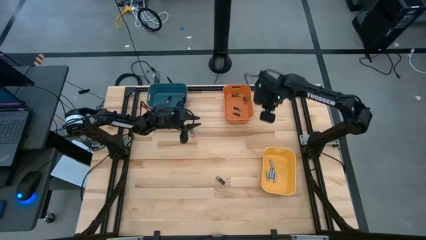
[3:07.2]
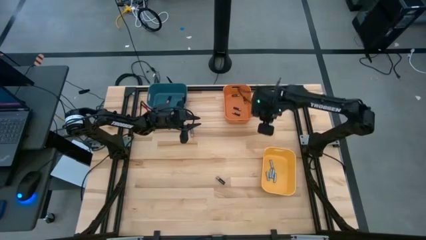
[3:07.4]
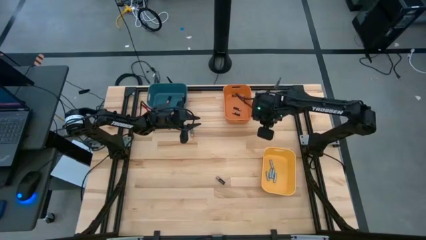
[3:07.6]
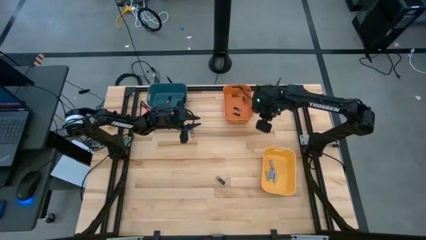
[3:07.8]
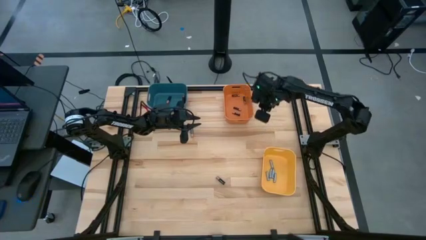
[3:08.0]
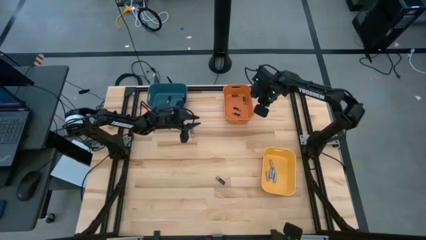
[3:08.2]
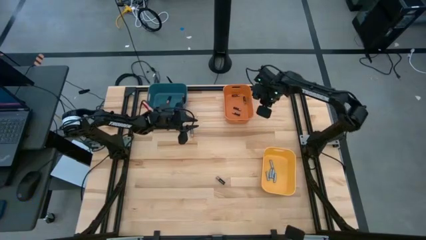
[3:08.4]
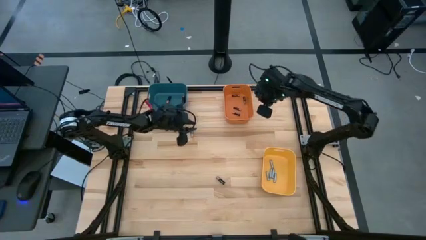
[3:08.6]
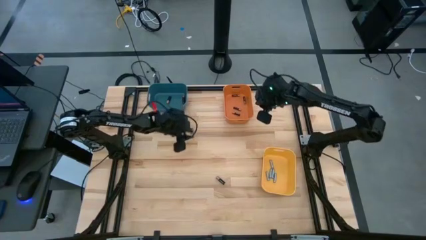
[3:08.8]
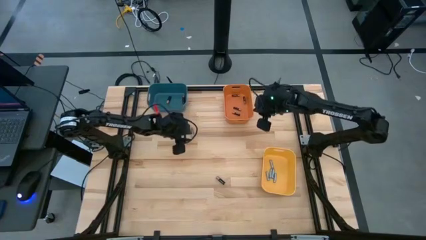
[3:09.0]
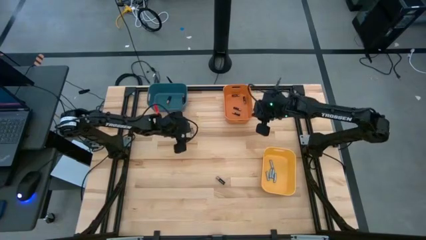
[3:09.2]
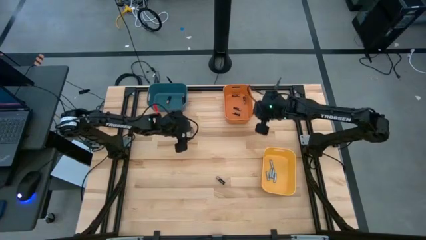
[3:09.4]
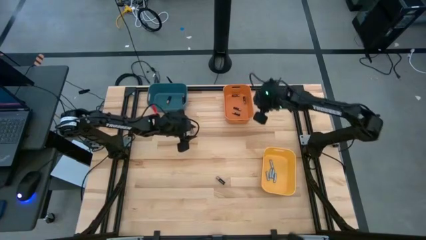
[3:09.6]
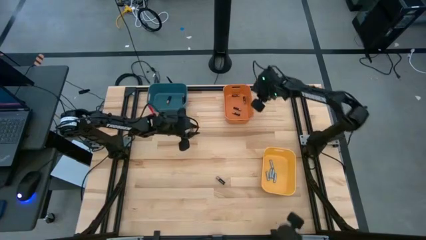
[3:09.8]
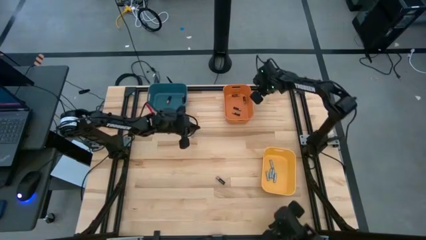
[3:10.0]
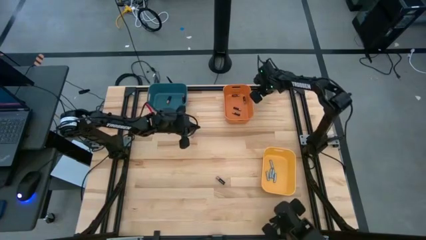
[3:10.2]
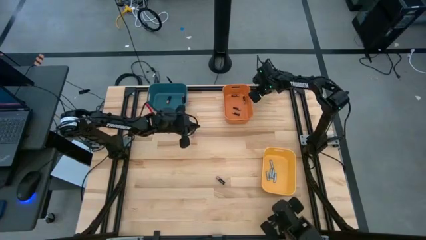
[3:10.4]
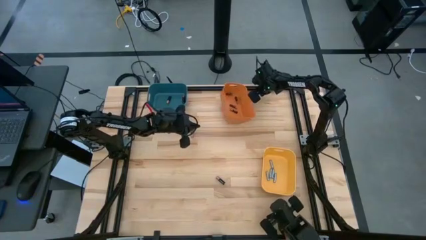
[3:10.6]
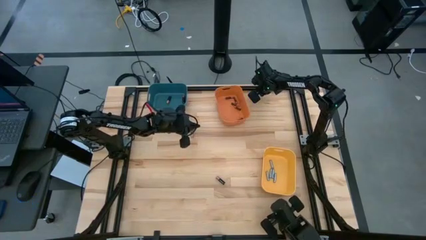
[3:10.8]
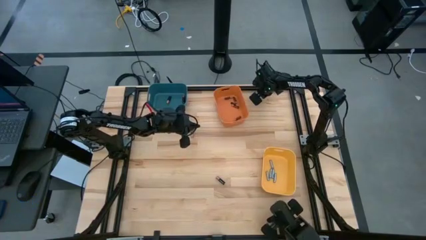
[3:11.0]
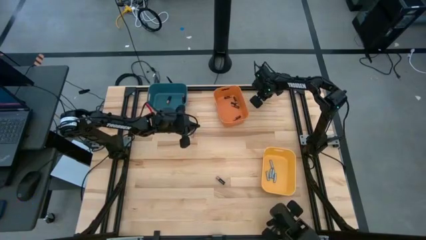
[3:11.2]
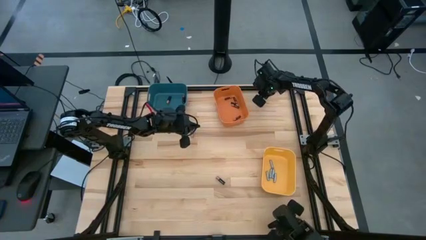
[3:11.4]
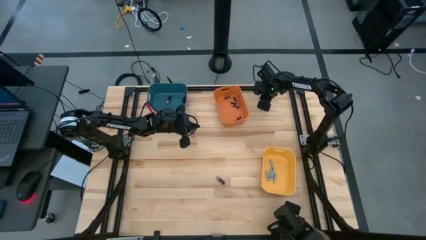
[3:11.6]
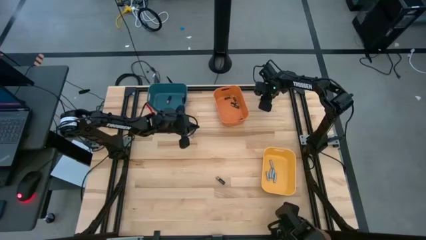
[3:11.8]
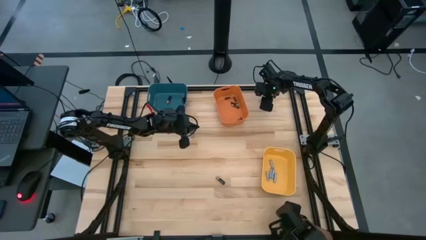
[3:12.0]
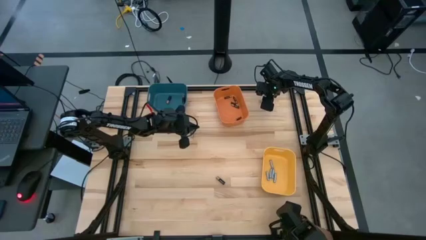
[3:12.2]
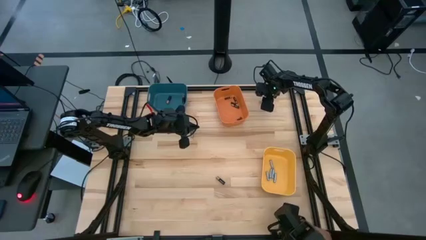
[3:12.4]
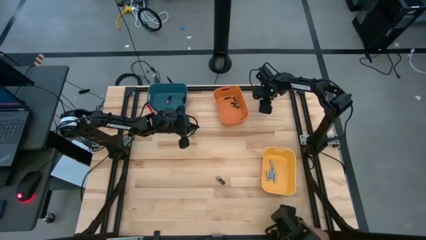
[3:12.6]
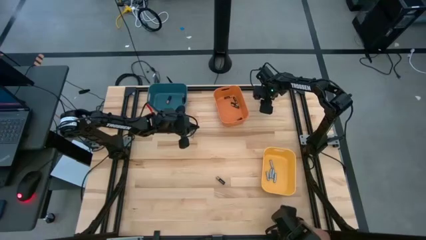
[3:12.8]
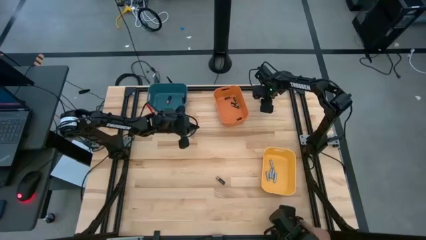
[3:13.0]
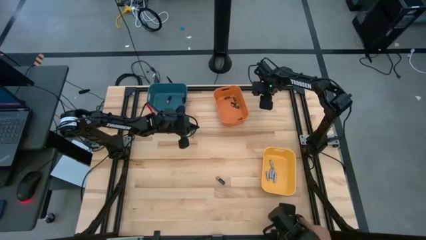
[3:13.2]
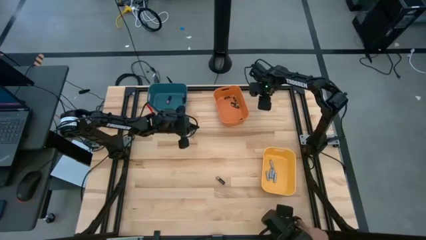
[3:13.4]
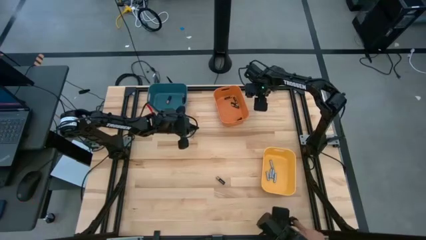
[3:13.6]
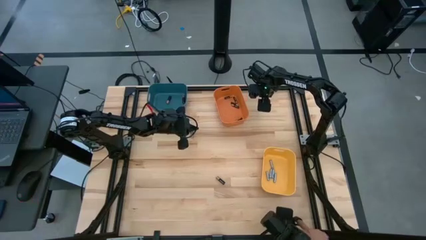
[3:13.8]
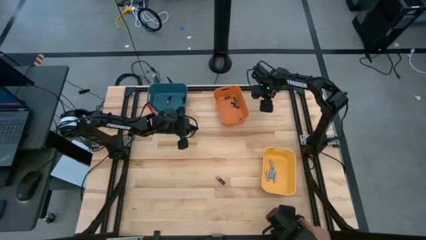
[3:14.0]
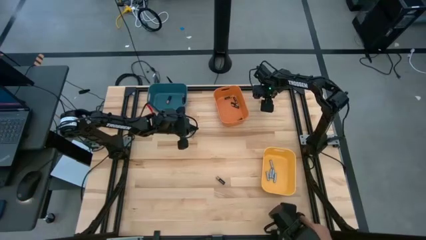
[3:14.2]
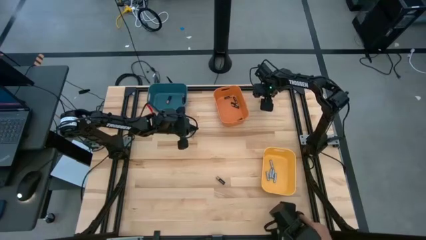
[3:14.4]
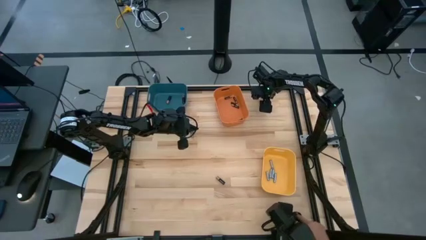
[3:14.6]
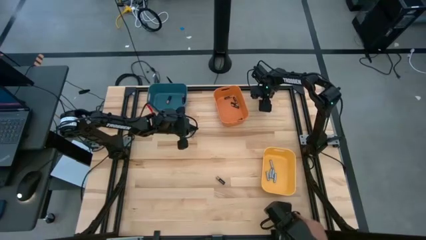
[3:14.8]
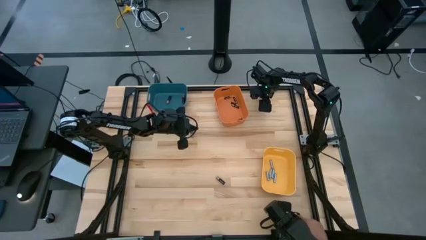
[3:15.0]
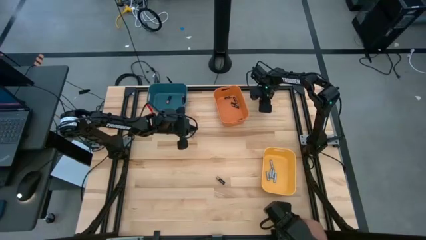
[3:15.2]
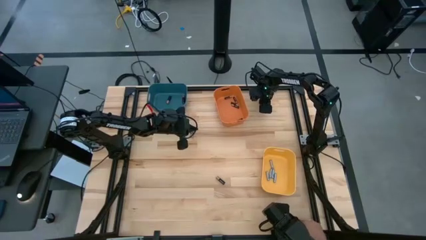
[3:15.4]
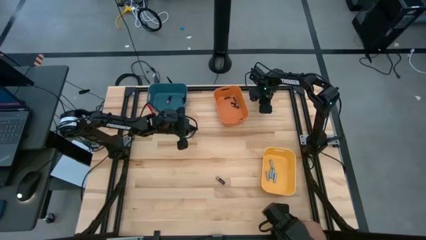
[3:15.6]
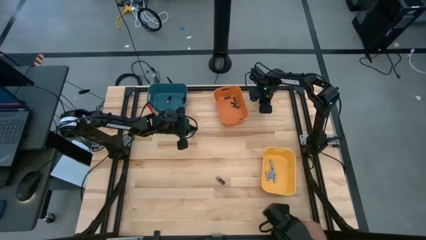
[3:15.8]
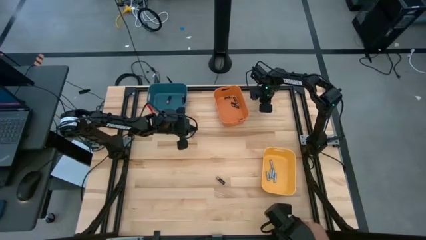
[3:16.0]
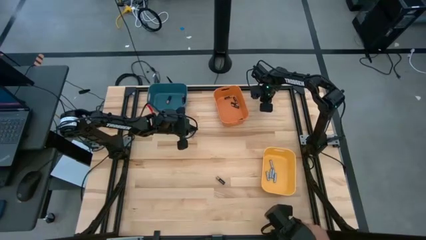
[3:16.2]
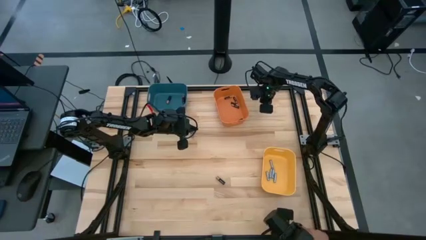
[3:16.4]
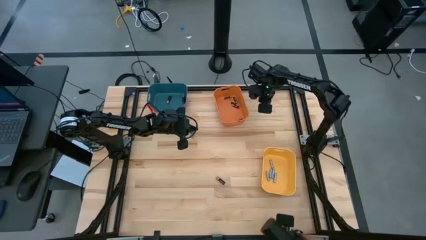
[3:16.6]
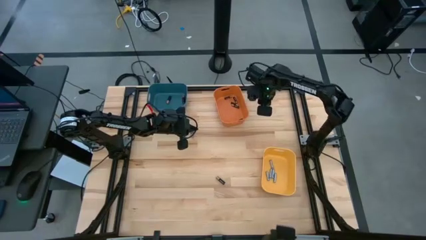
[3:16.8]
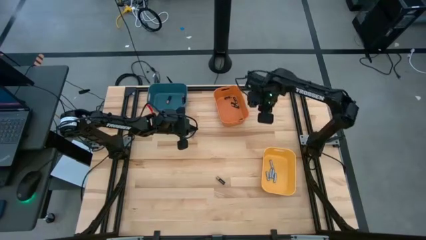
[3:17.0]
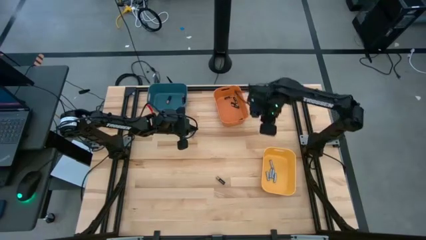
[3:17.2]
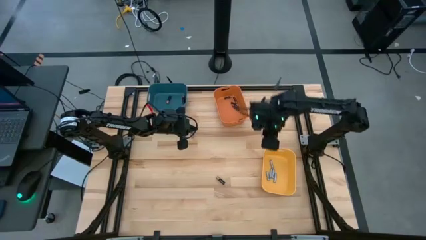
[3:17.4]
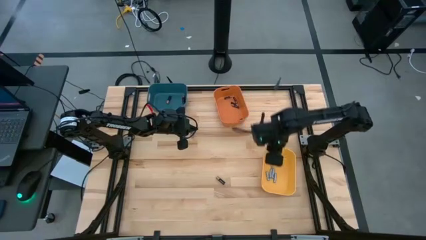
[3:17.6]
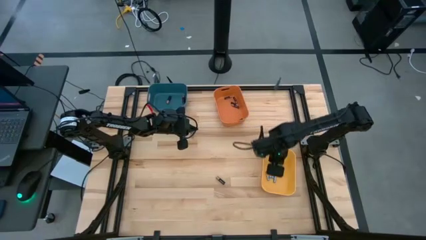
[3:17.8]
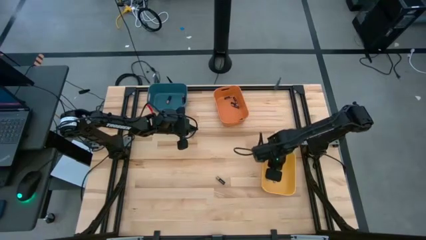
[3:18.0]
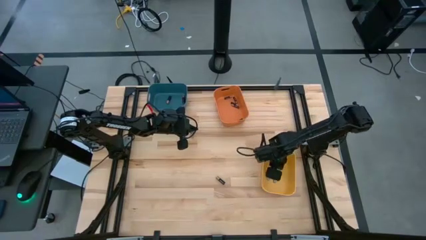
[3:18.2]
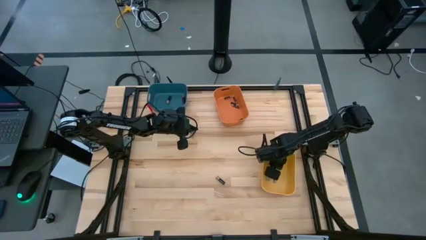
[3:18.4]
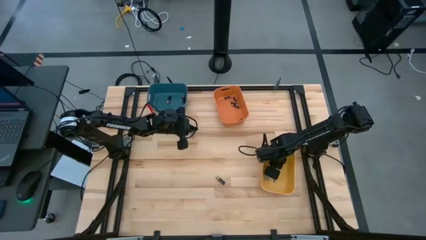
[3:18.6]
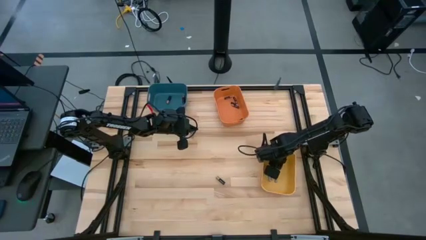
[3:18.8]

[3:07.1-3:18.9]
Task: Sort batteries
Put the silver battery into the yellow bin
